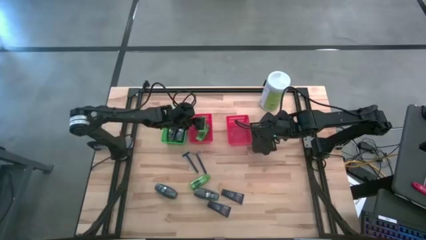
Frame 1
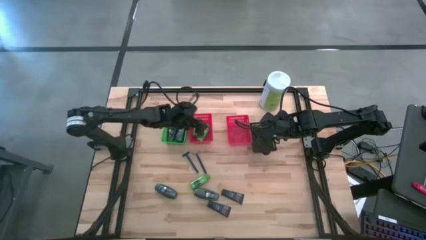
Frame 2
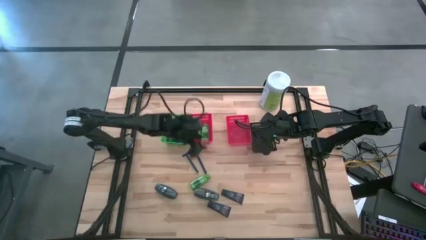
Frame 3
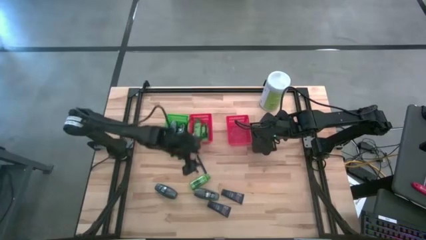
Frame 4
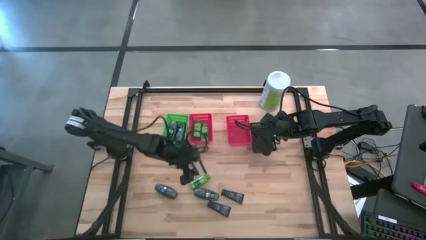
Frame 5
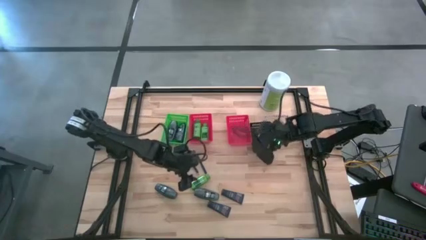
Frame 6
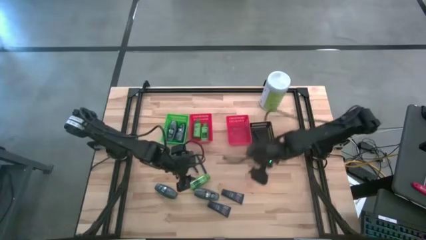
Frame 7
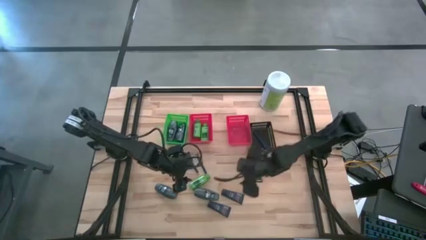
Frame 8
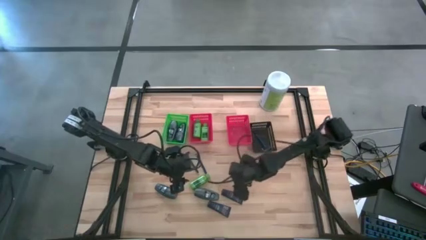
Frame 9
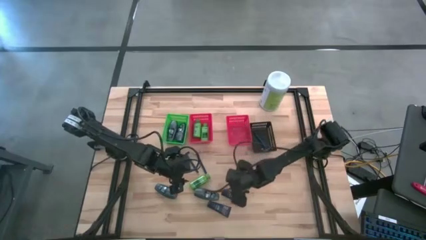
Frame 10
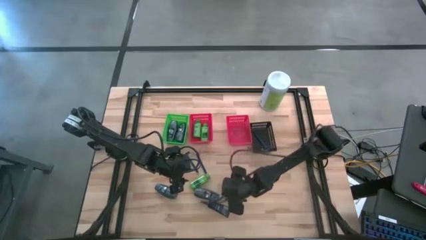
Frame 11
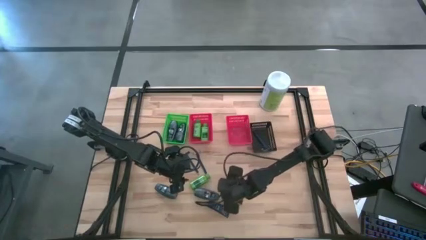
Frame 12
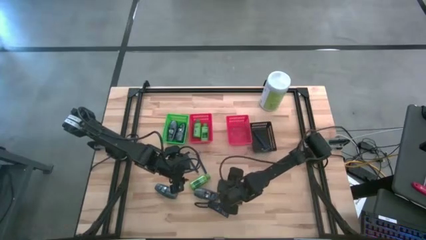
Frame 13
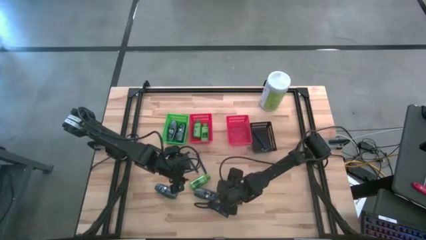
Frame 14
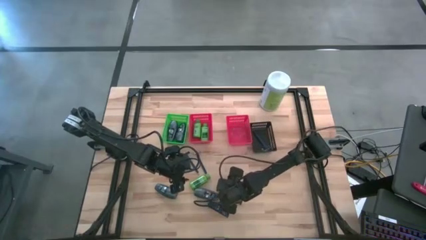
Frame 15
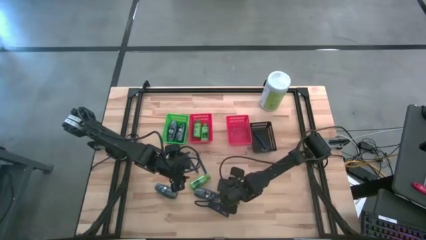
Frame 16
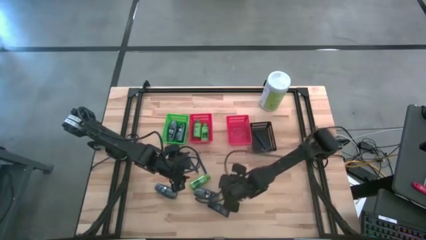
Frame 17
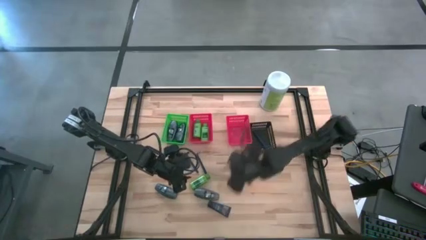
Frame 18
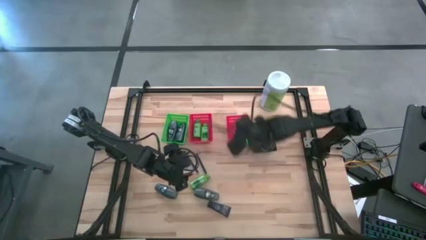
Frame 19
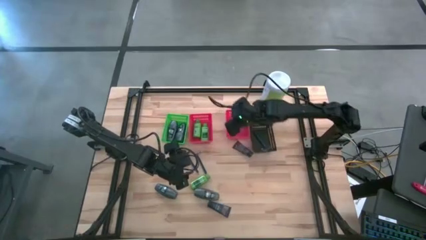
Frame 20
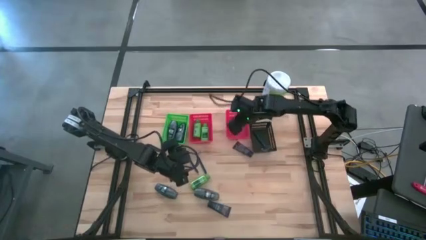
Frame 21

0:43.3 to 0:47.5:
Task: Pick & Place Travel size toiletries
Put the blue shaving cream tube into the right red bin

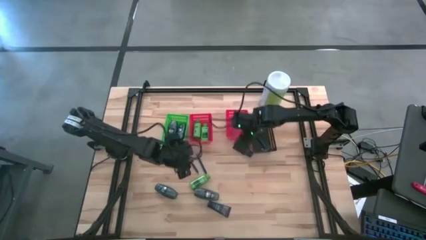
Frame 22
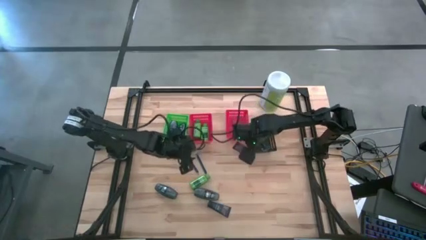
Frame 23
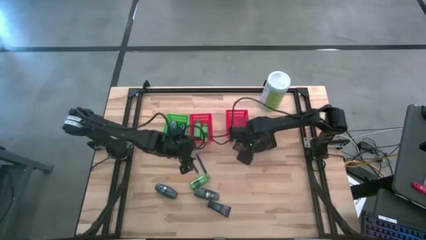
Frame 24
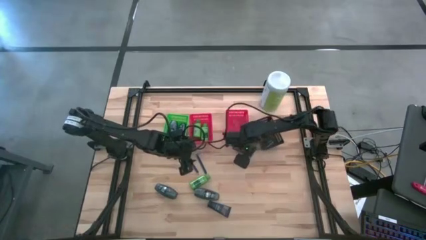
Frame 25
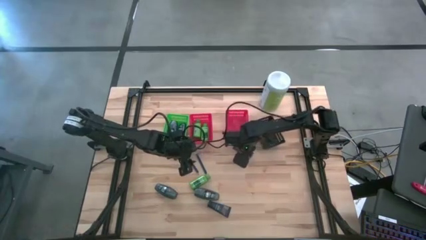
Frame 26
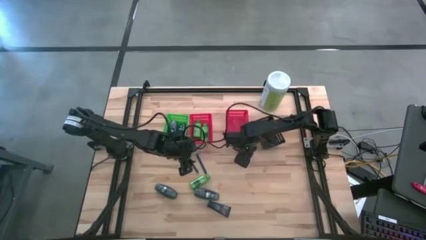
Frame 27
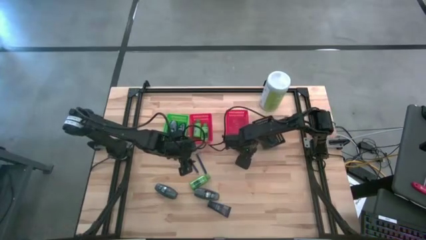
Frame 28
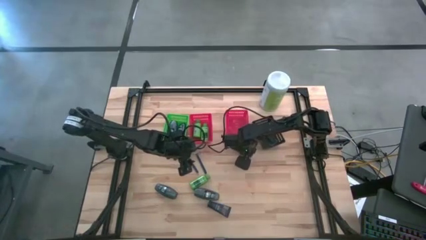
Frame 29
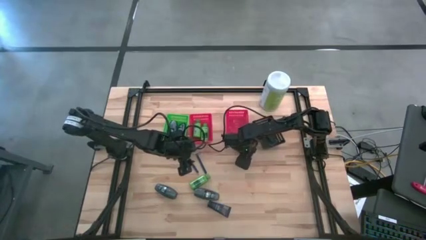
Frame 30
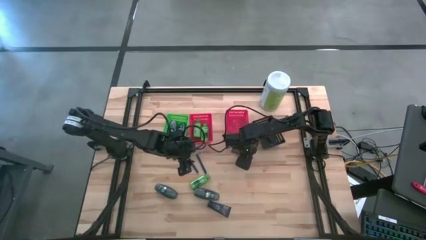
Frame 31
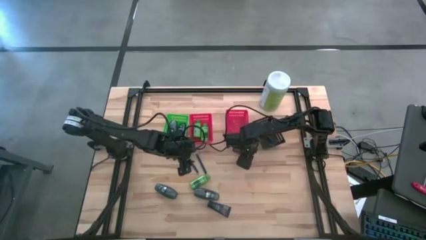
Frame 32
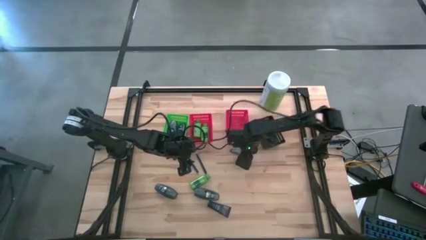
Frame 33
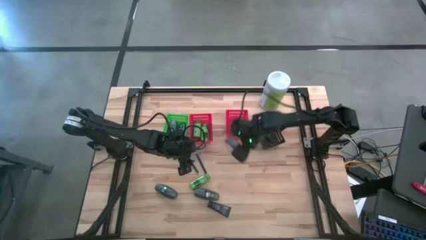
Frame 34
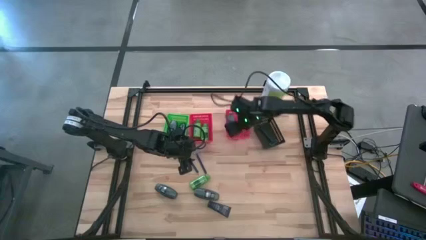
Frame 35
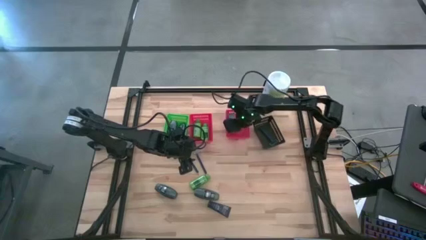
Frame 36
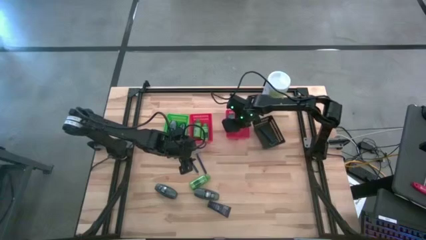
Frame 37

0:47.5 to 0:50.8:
Put the blue shaving cream tube into the right red bin

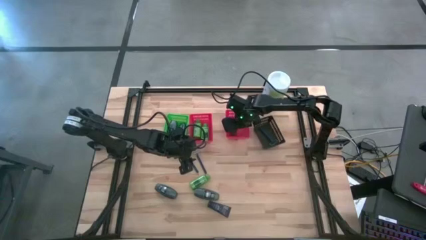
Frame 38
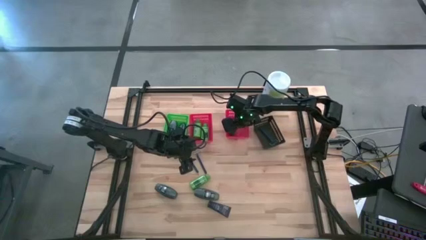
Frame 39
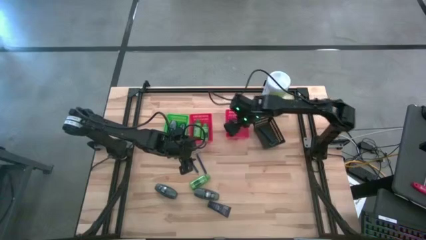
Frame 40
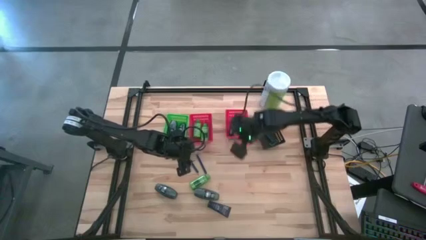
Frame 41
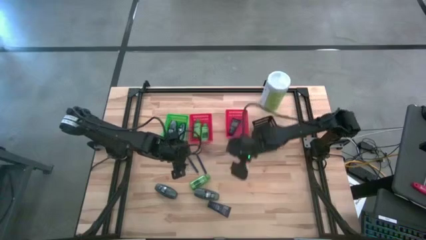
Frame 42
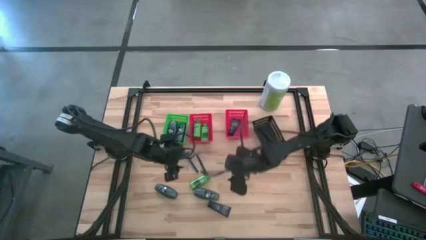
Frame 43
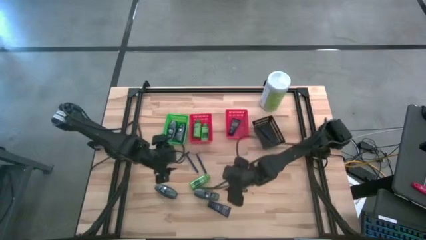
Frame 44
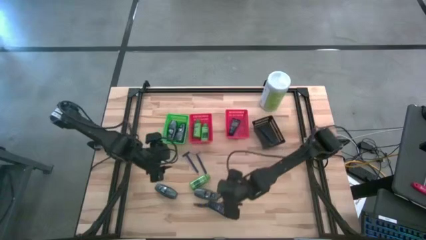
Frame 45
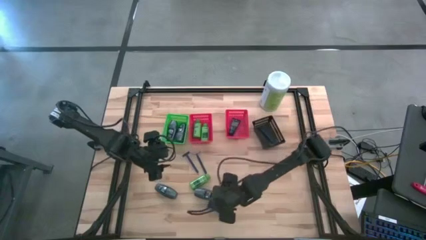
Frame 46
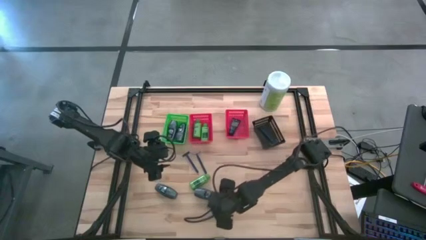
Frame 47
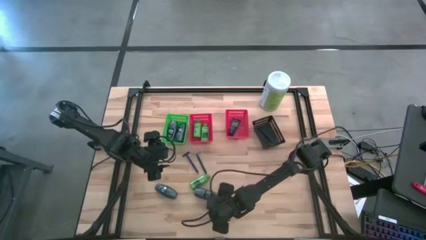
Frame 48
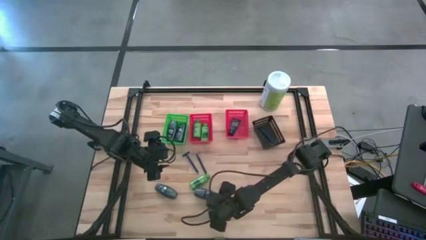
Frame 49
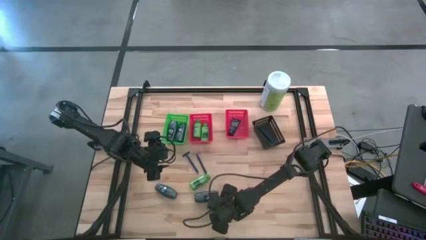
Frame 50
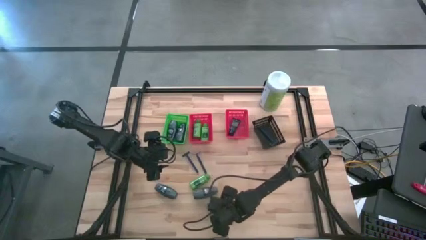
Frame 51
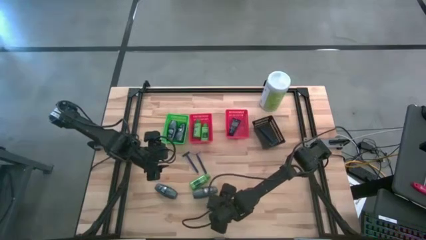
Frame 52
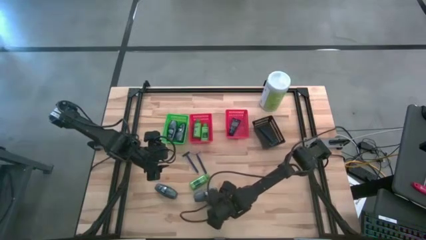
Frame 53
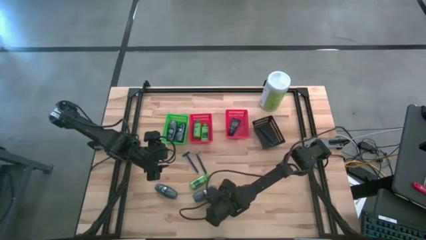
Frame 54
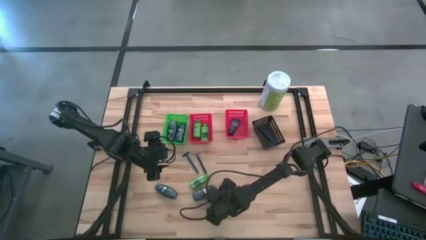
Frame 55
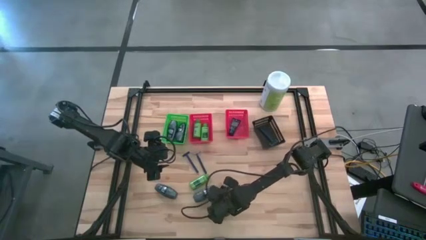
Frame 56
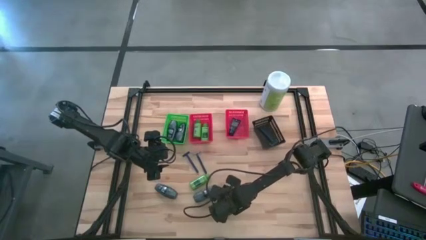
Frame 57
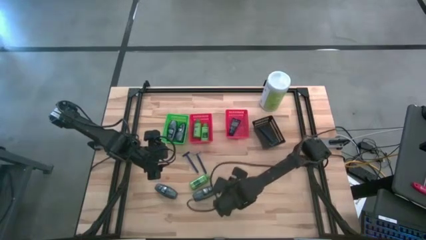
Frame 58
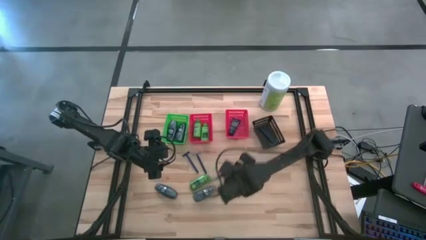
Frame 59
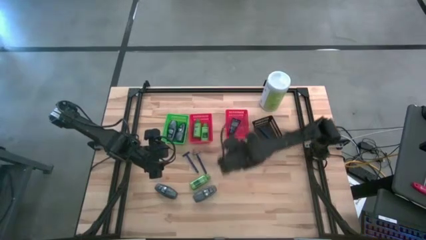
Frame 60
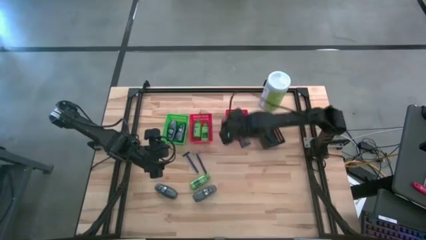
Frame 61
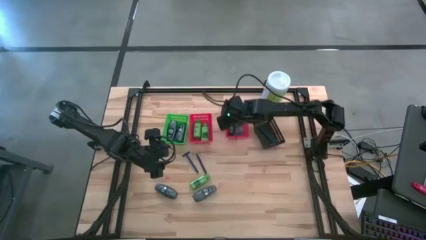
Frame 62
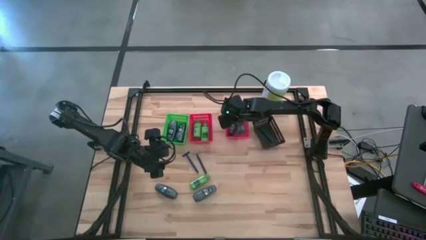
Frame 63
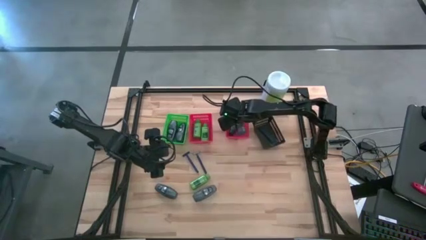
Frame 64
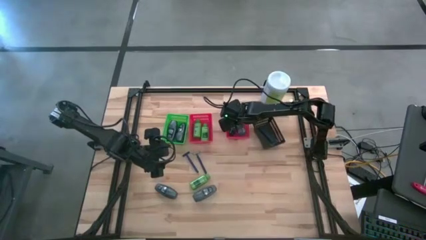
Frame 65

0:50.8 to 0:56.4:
Put the blue shaving cream tube into the right red bin

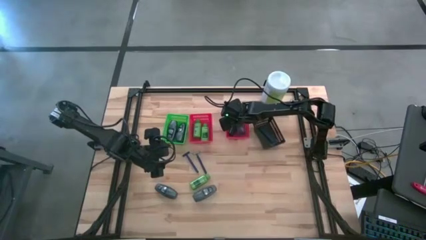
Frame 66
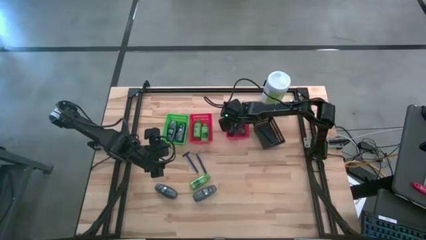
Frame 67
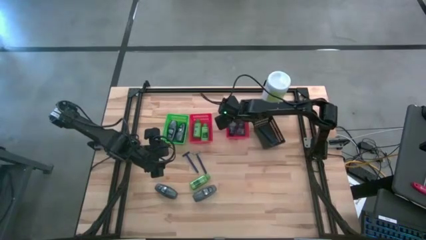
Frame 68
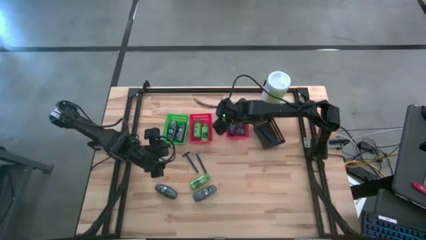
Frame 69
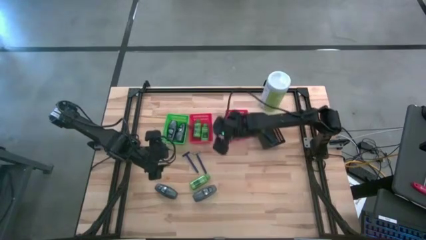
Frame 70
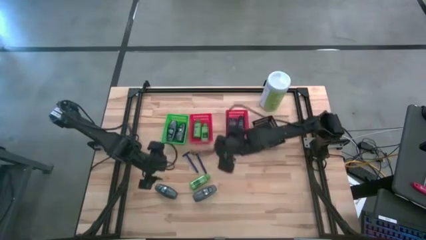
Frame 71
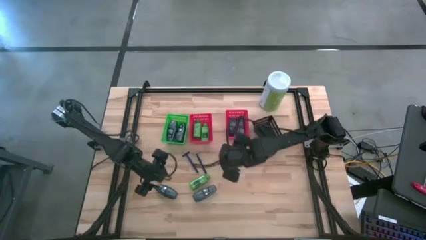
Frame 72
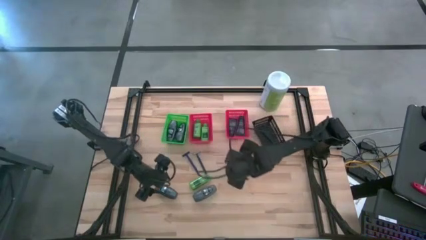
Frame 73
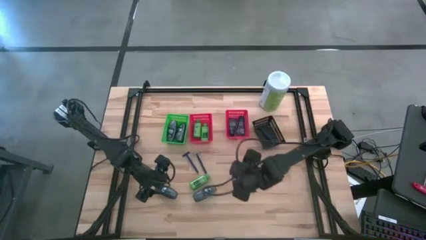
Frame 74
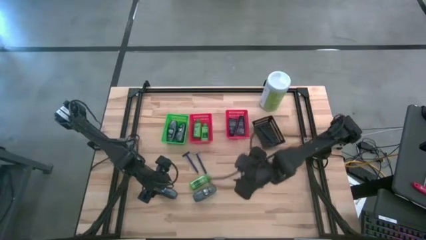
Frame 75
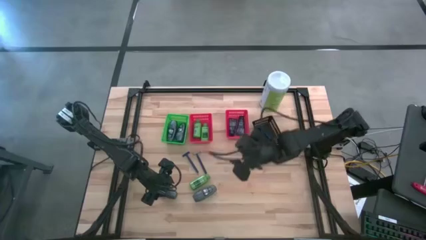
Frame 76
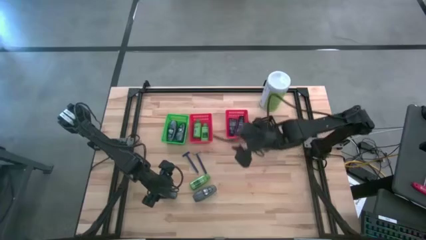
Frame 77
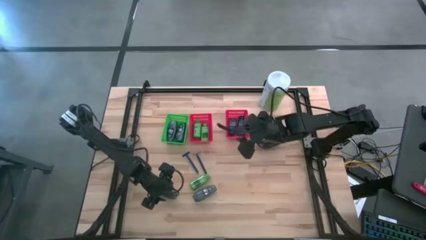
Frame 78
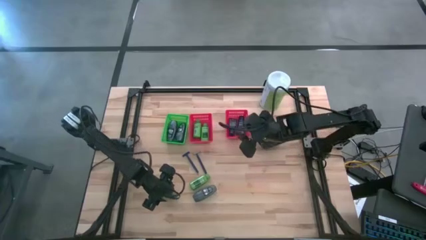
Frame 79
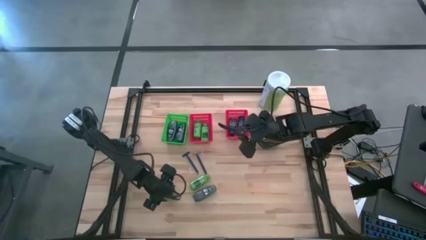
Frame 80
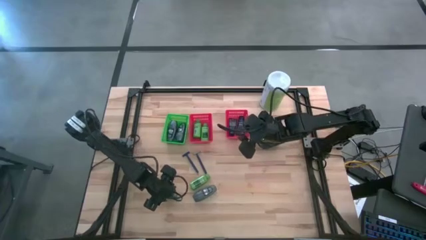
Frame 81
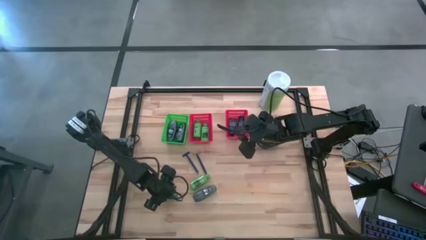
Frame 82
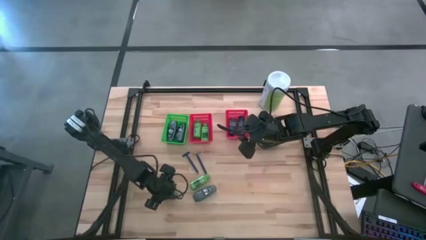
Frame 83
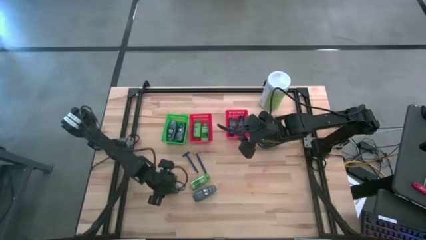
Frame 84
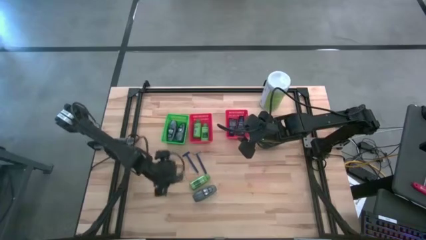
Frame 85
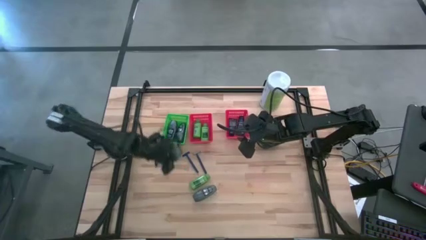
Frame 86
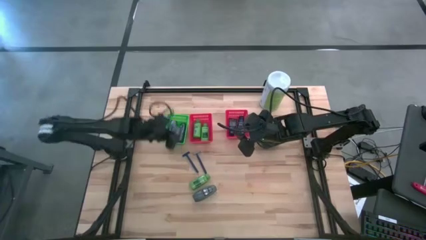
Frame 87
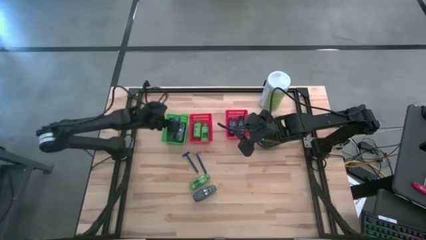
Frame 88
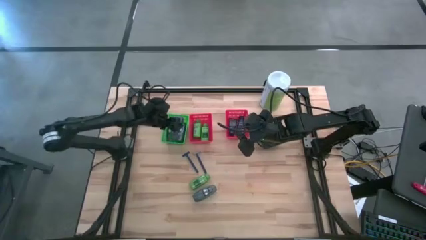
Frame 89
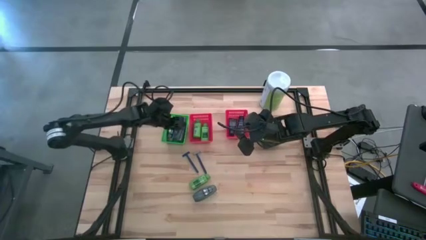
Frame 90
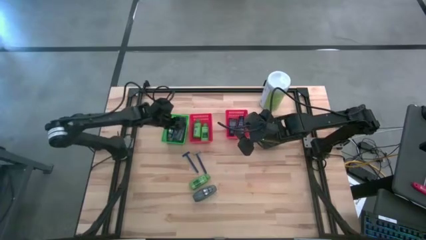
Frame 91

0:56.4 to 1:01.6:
Put the gray deodorant into the green bin
